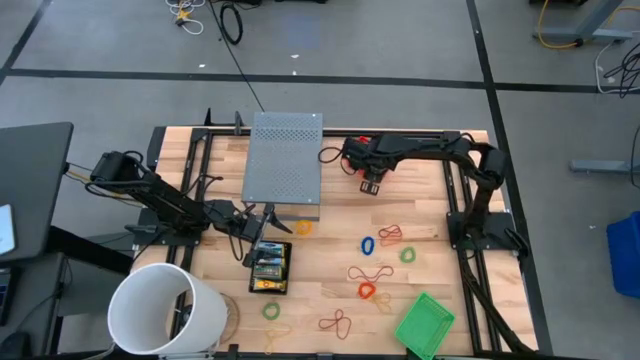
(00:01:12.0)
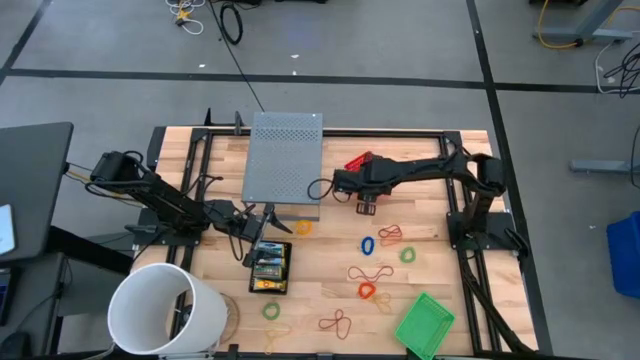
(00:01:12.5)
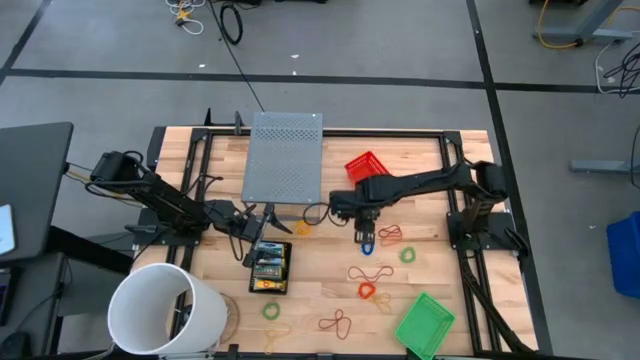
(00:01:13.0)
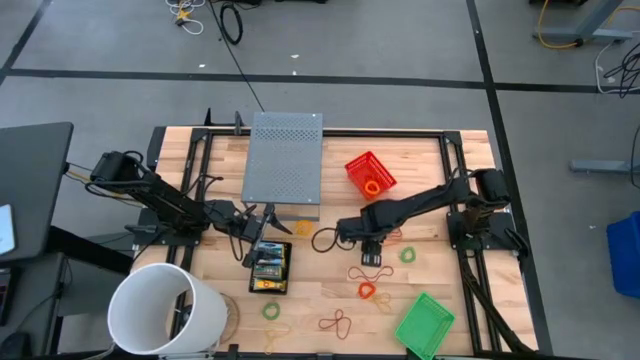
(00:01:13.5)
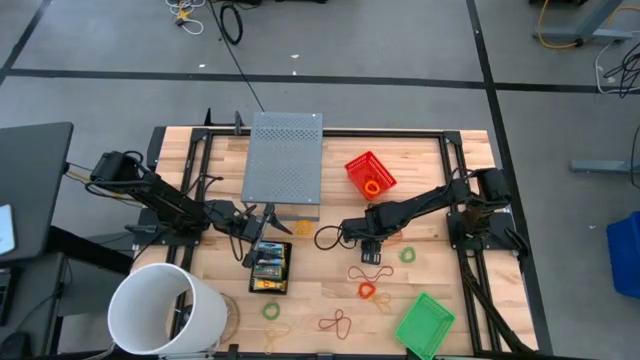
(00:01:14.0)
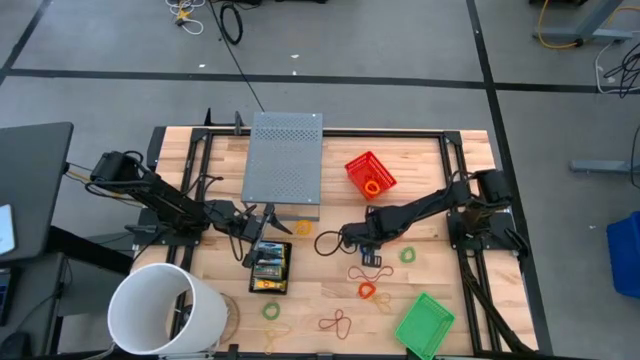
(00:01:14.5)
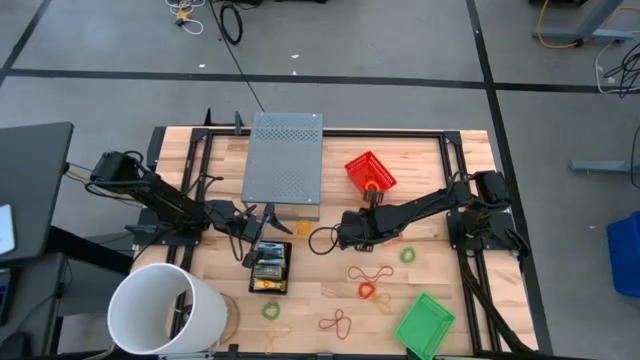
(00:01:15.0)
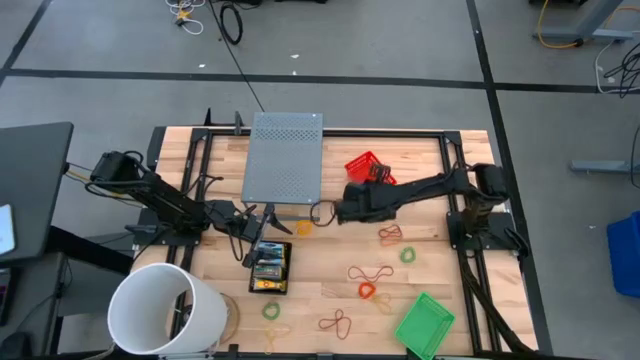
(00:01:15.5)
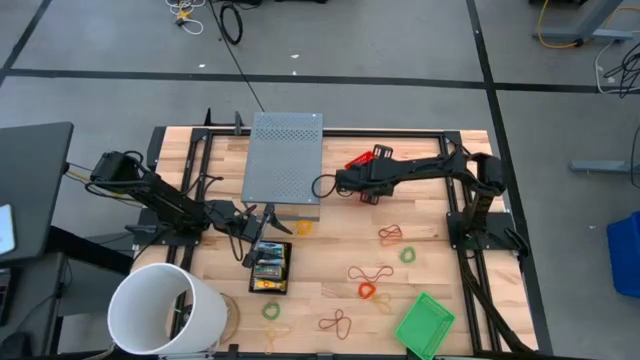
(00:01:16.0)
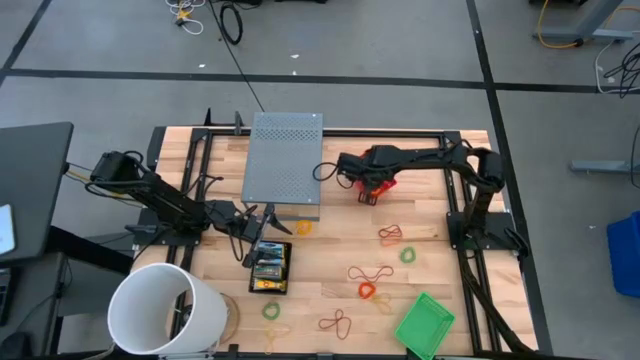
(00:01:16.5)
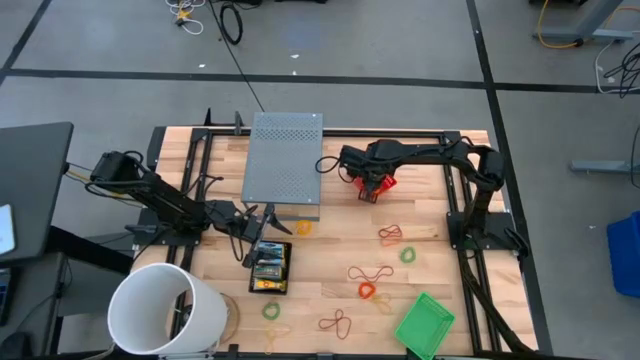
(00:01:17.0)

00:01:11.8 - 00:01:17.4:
Task: Pick & Place Office Desk Supplies
Put the blue spring keychain into the red basket

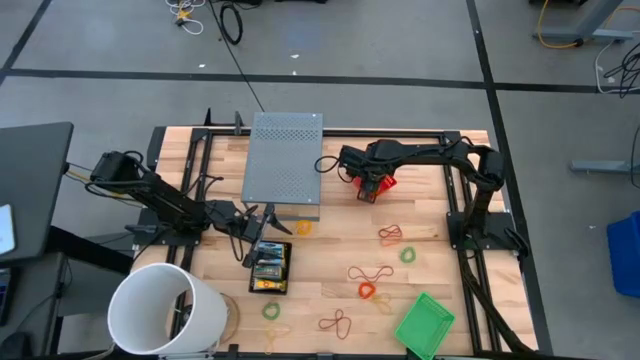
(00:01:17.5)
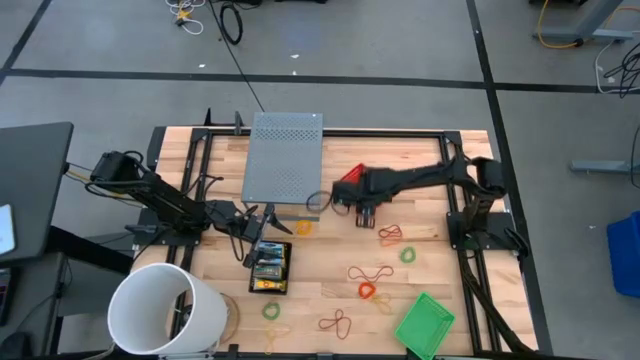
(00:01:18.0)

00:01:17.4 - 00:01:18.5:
Adjust the red basket on the table

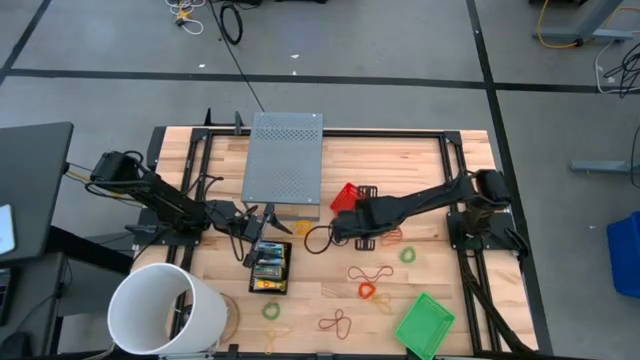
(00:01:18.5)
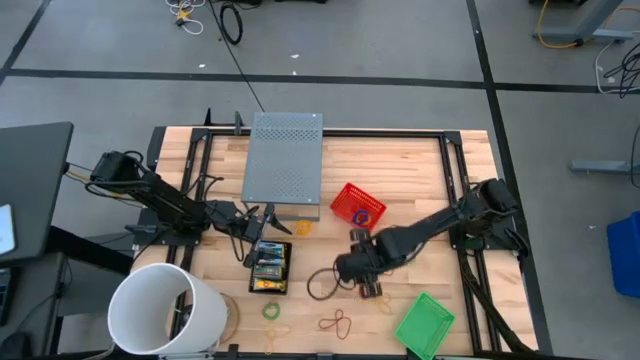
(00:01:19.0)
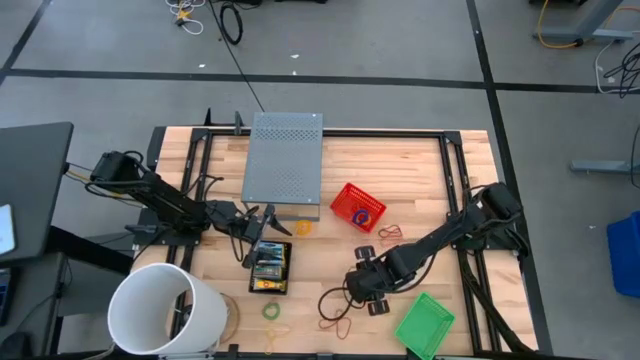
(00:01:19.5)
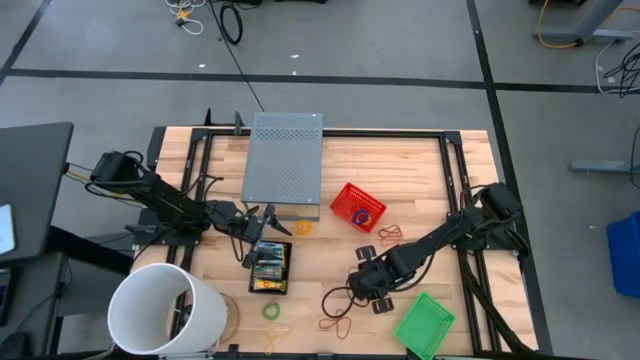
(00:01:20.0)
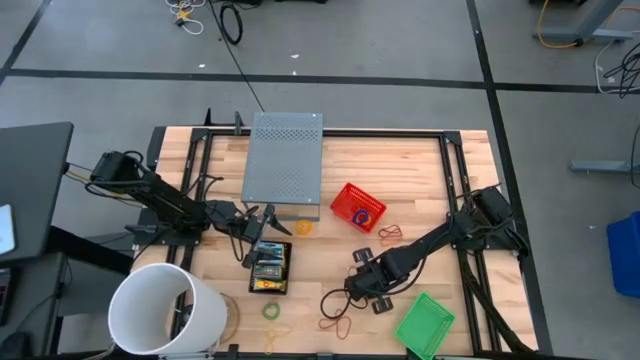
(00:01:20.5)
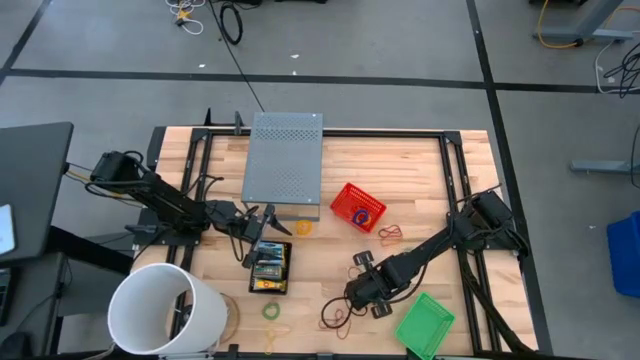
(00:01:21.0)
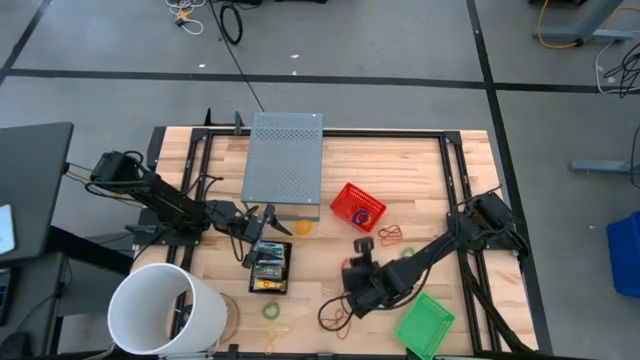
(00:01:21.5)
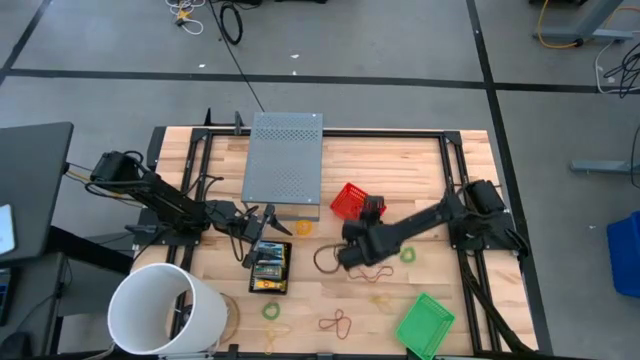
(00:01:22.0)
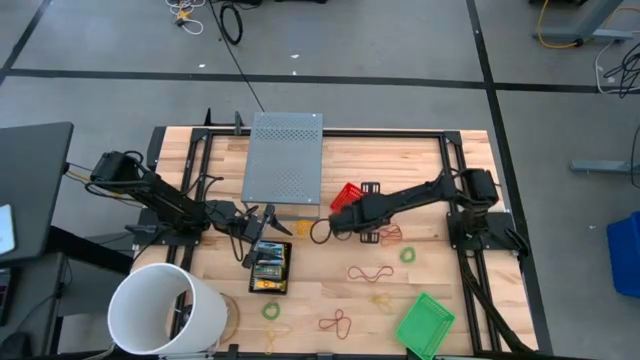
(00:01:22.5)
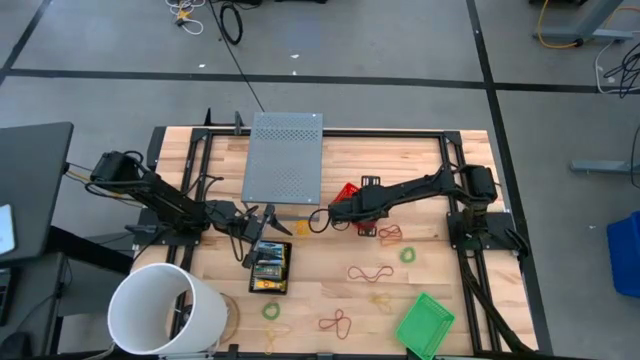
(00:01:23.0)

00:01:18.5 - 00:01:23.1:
Put the orange spring keychain into the red basket

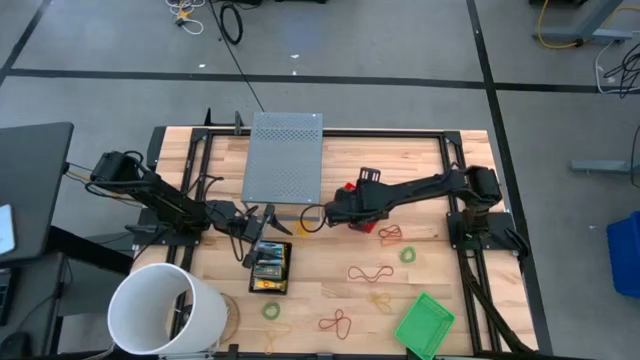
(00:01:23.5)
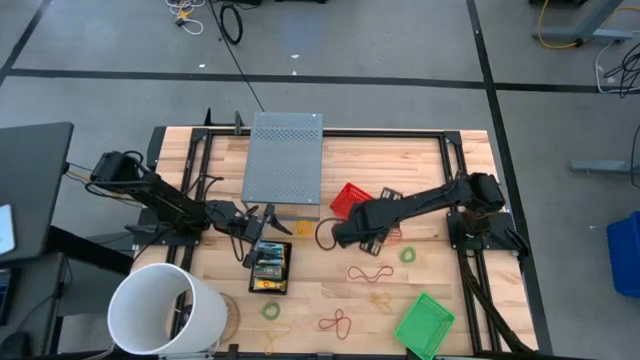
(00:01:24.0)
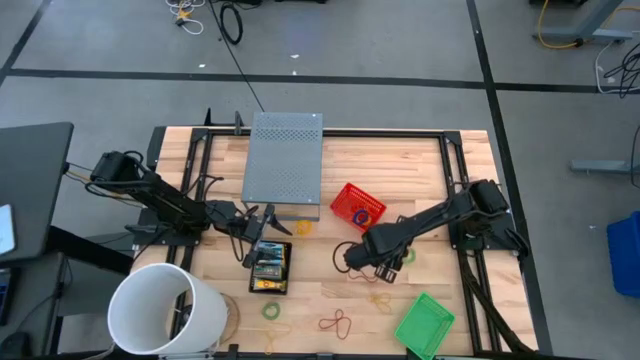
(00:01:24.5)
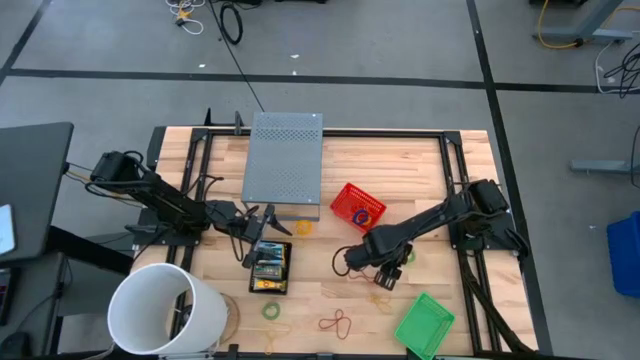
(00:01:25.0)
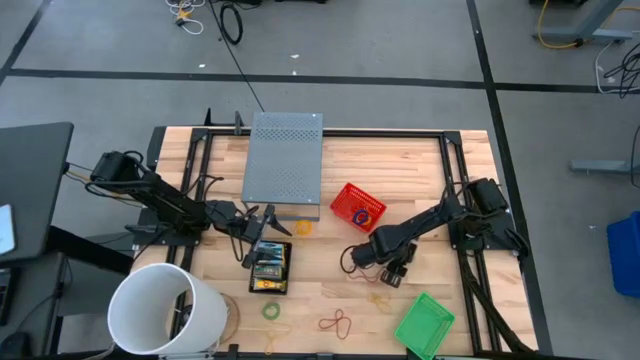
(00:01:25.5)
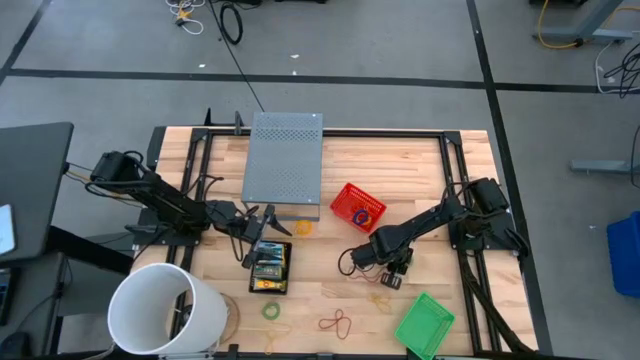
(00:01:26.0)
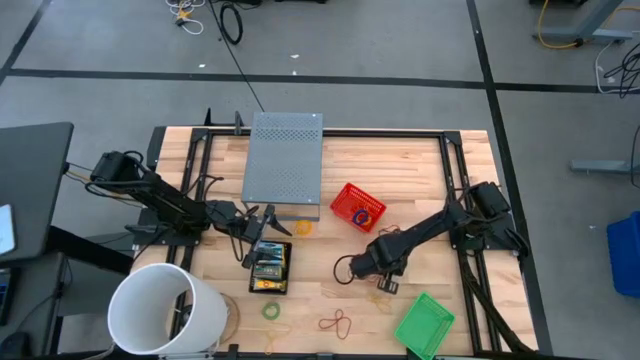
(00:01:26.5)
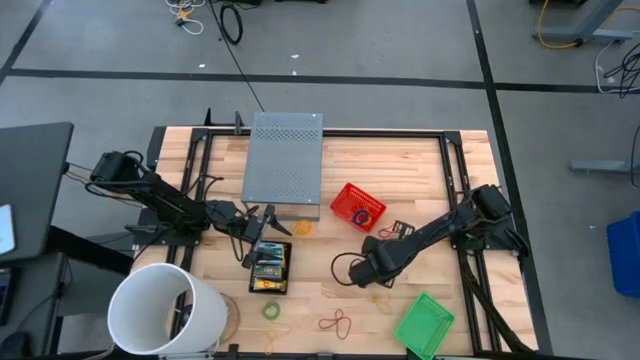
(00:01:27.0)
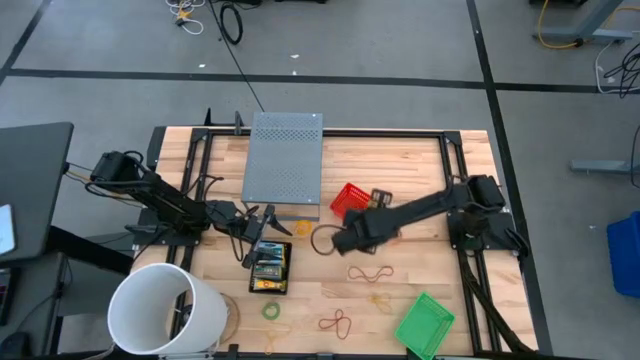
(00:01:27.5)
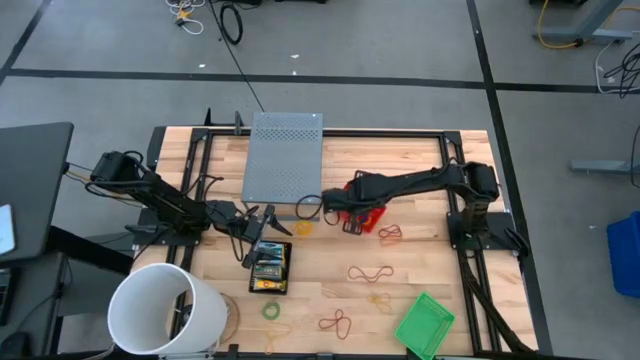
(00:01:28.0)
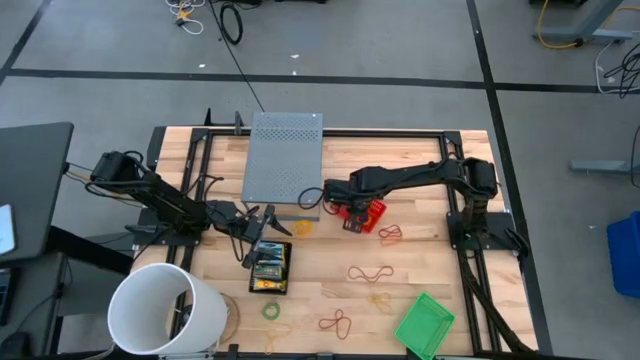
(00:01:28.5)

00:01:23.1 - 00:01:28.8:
Put the top green spring keychain into the red basket

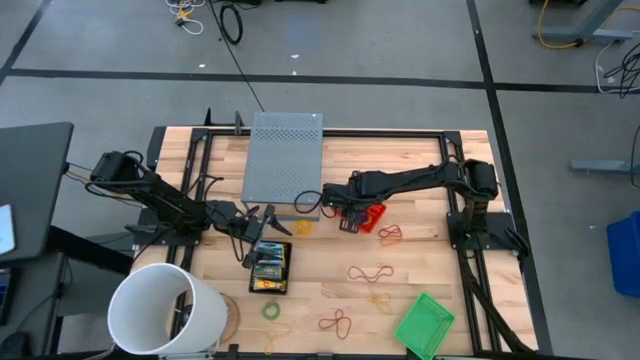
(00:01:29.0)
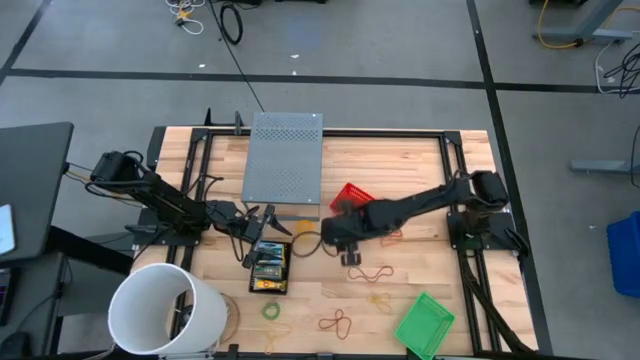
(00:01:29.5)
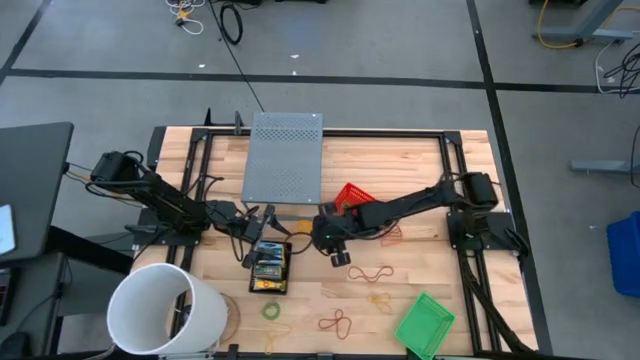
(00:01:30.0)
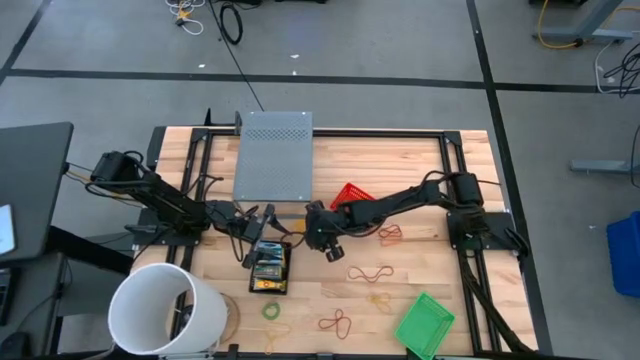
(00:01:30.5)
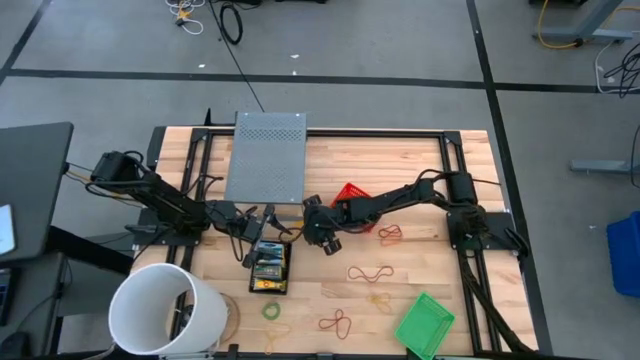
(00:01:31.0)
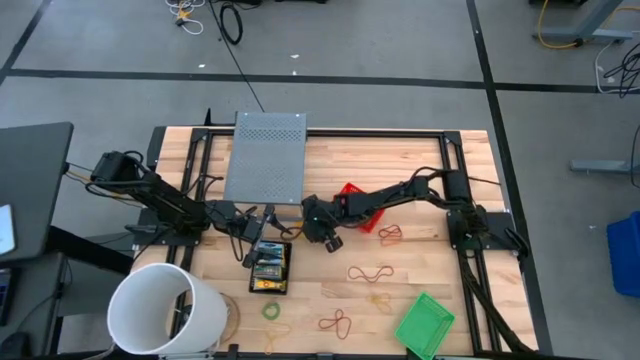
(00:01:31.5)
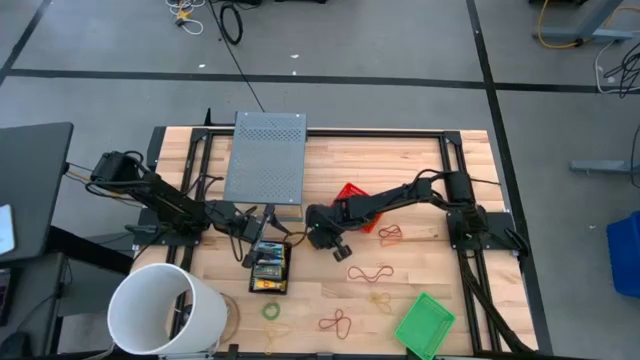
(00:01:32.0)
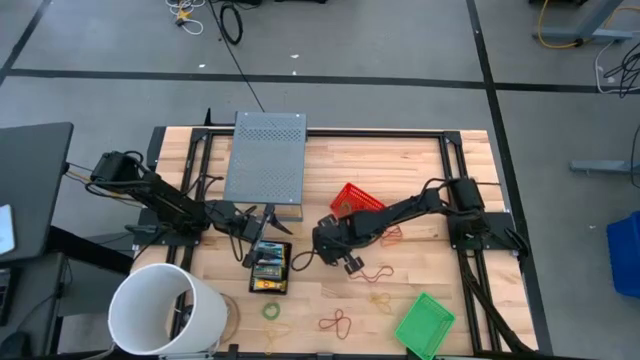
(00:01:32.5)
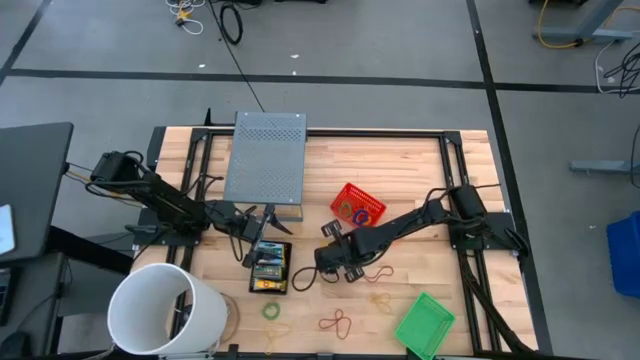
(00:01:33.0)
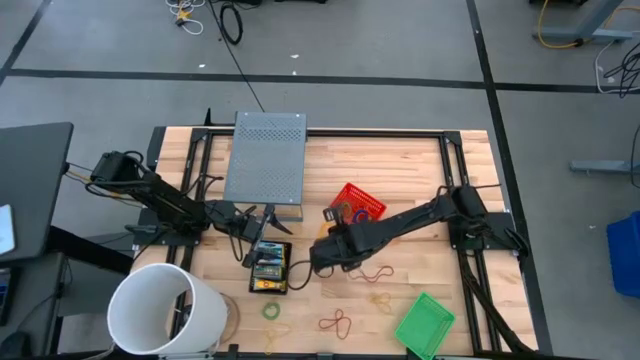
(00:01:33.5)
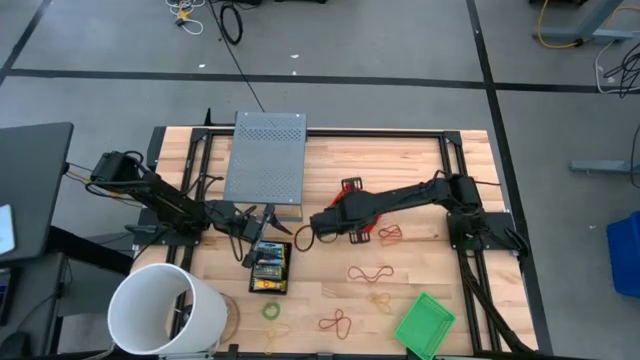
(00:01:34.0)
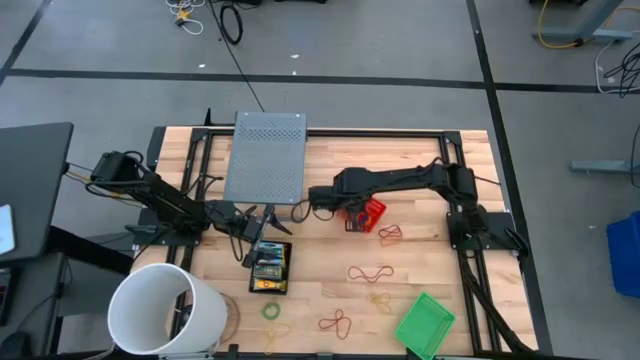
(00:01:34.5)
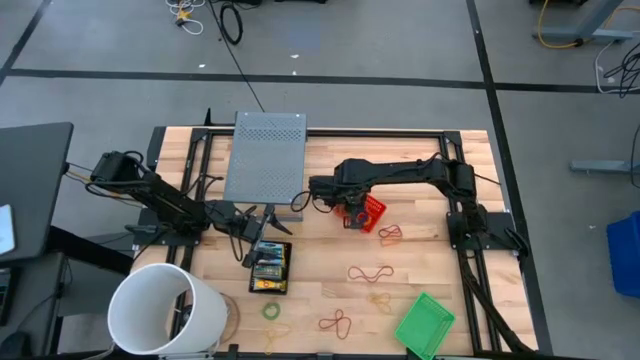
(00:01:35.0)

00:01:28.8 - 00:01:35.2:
Put the yellow spring keychain into the red basket
